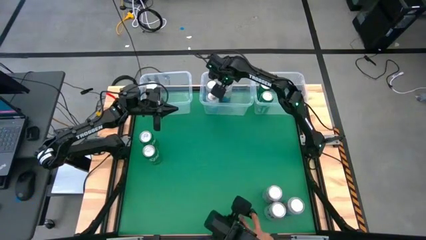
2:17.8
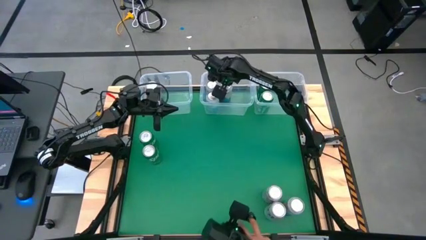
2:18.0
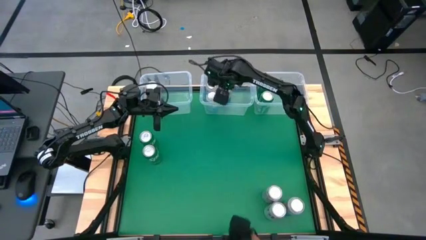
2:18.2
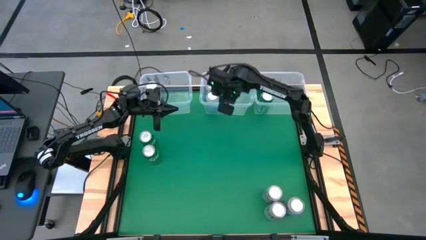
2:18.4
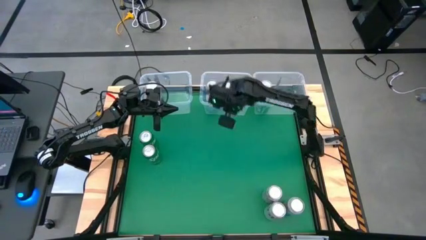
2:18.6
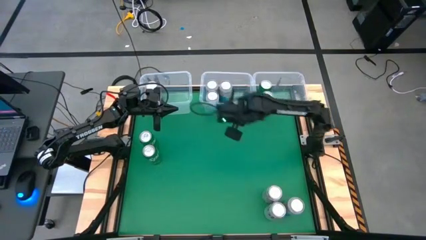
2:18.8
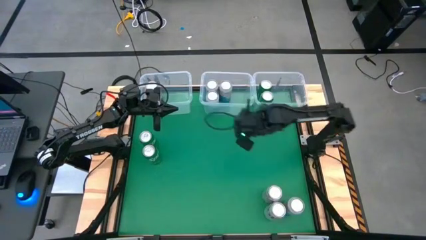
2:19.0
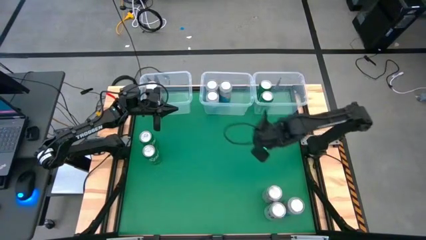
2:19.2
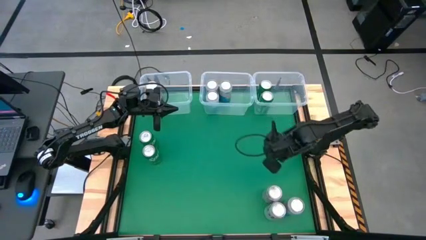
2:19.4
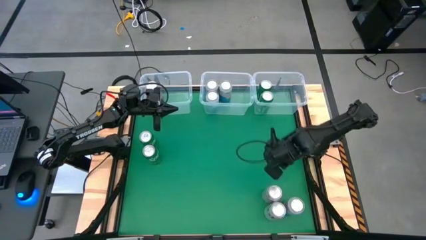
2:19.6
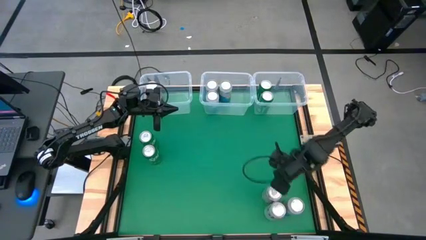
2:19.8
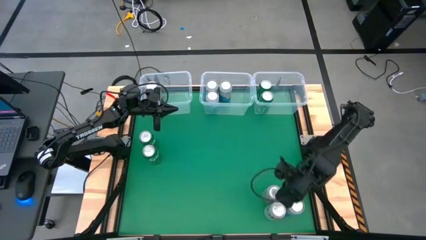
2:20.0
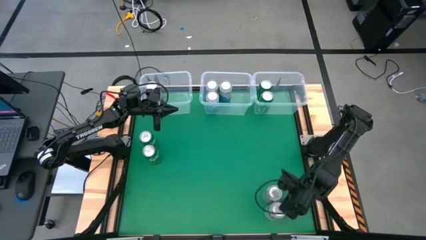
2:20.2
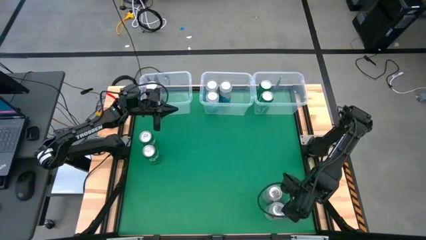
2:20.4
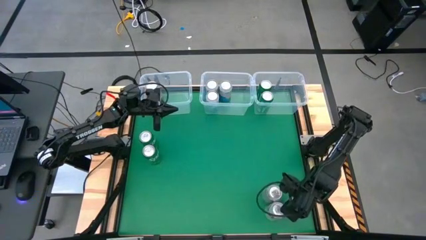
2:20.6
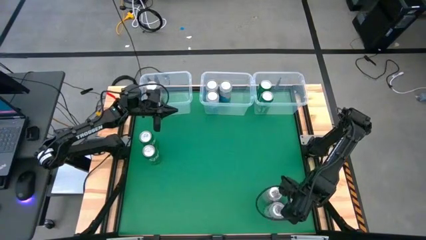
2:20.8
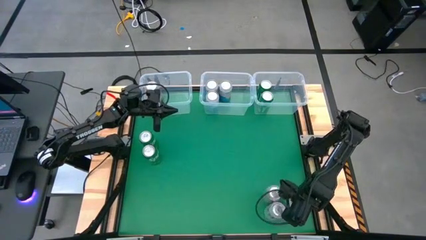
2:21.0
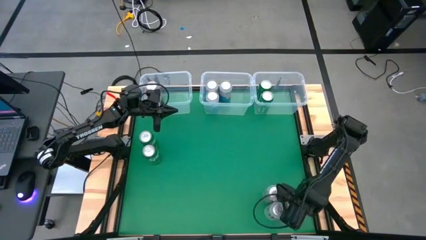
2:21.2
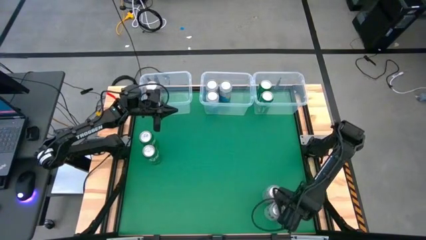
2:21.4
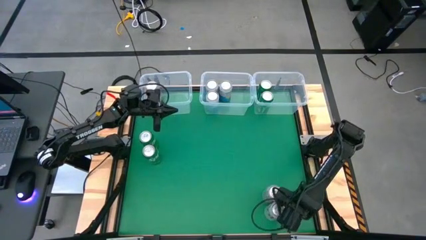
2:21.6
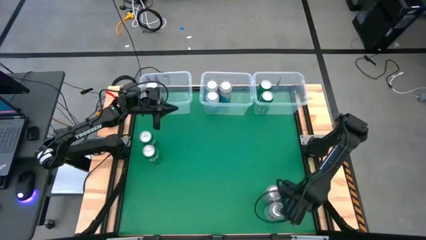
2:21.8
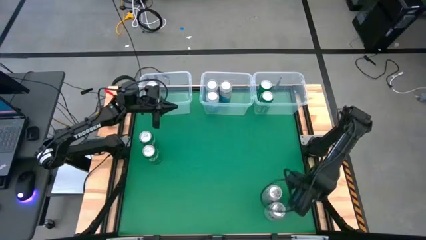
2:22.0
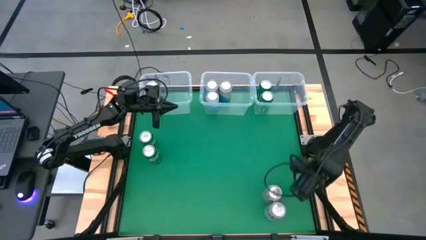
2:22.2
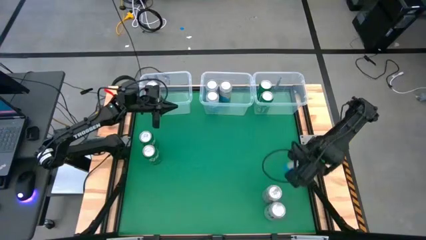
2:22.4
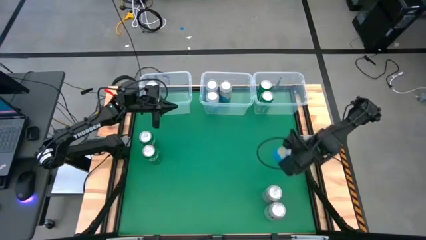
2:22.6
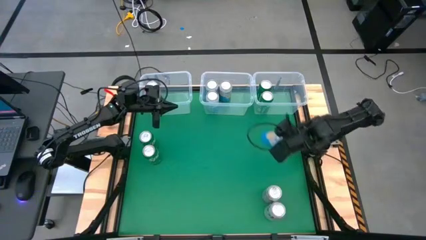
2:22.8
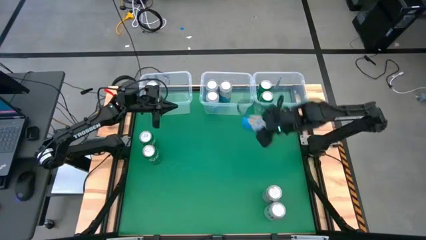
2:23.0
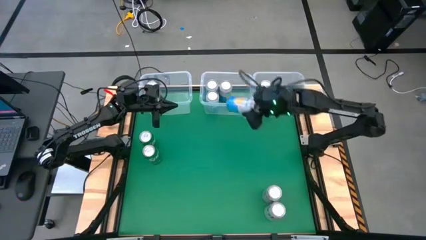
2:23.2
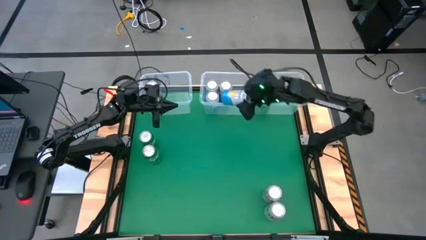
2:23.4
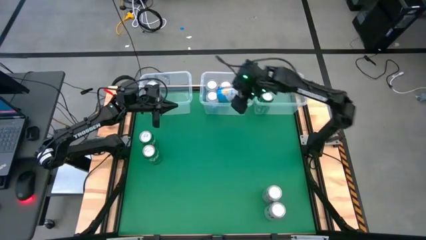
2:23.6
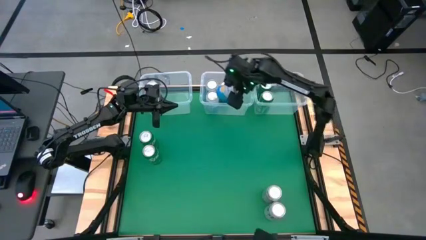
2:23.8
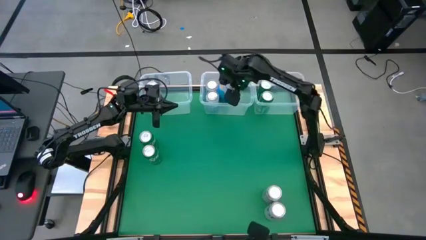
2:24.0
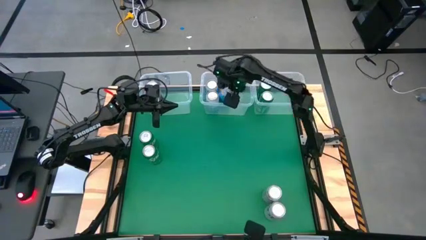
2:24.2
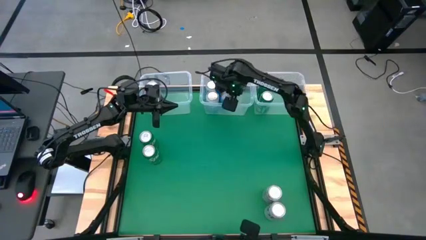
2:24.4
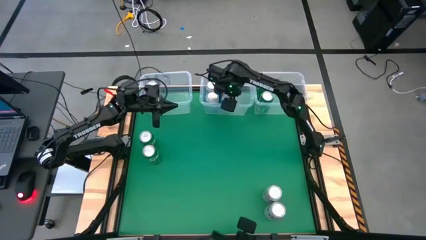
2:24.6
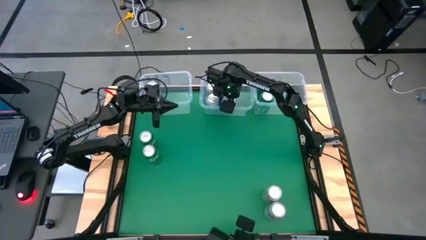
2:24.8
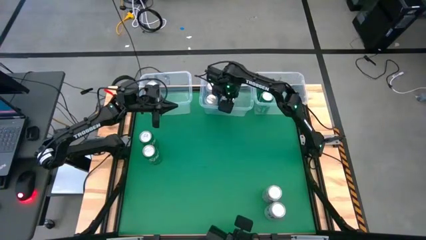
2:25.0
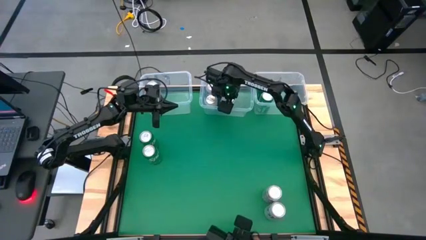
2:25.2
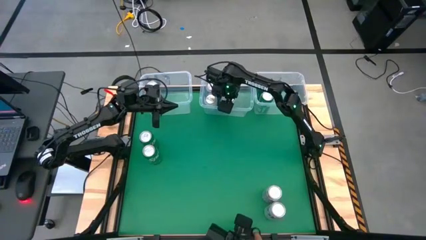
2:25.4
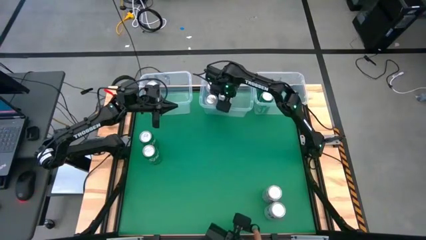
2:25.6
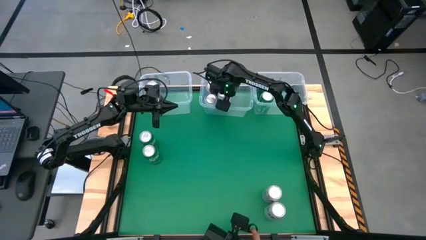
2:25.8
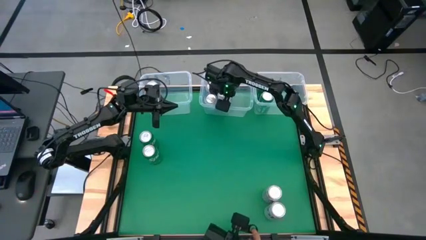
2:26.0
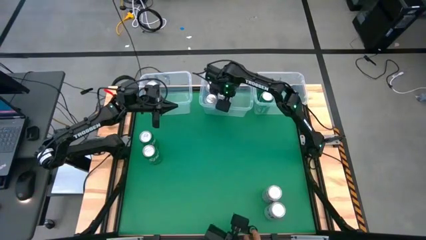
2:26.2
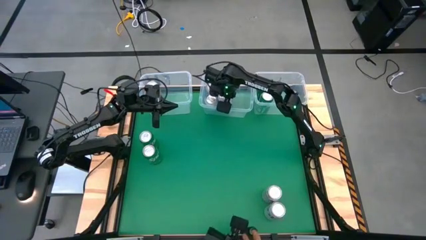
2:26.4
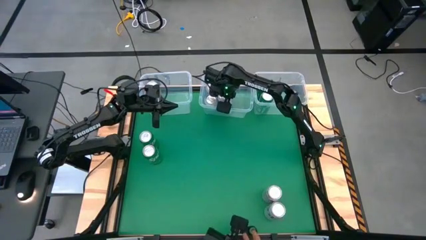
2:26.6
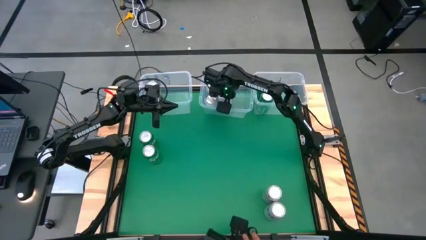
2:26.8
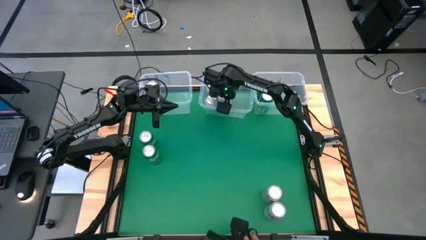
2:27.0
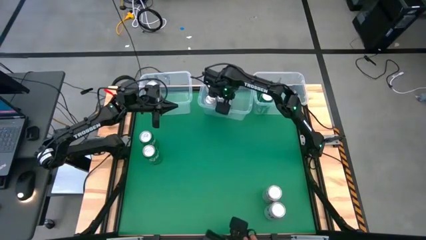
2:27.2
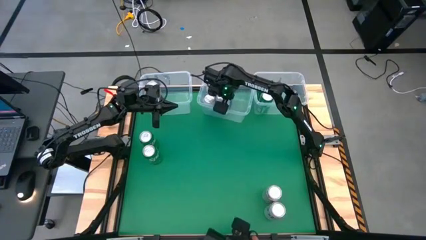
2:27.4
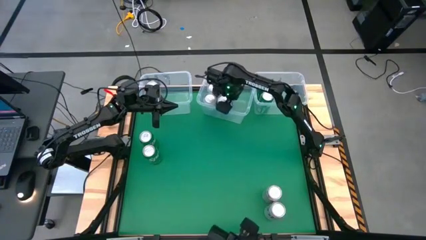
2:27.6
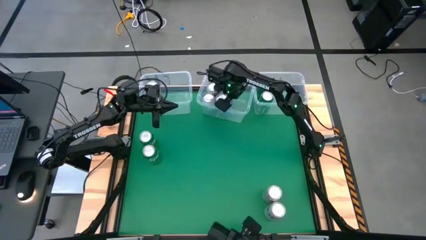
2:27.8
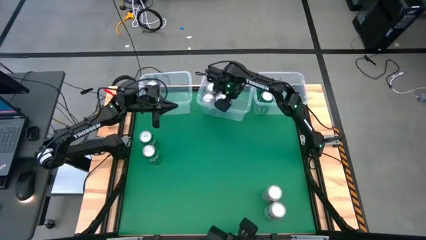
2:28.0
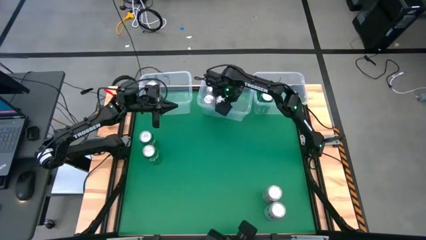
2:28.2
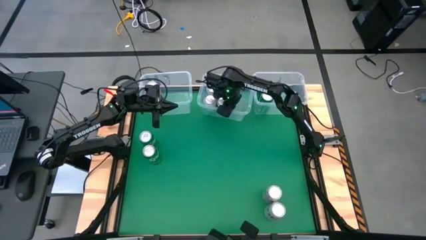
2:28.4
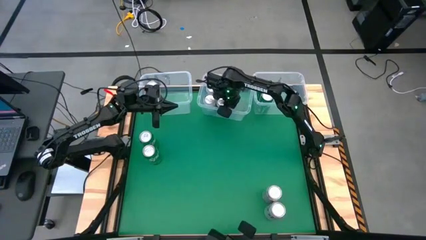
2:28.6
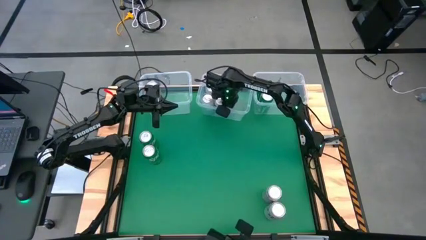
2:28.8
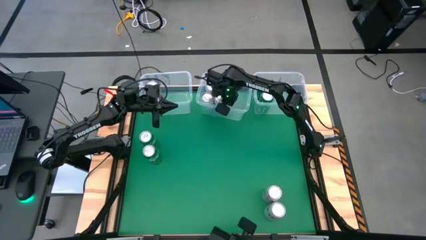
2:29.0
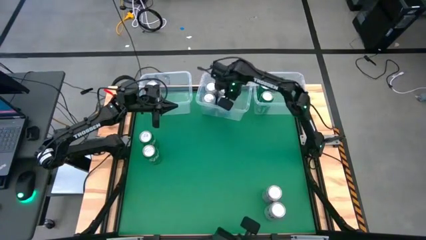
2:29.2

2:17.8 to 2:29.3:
Task: Sort soda cans
Put the blue white soda can into the middle transparent bin

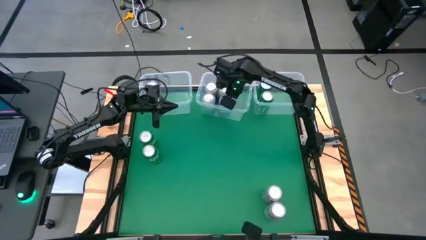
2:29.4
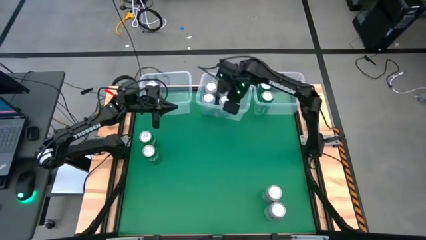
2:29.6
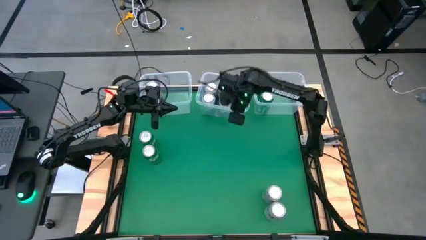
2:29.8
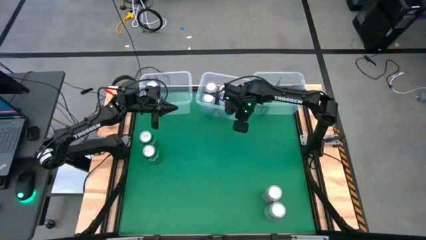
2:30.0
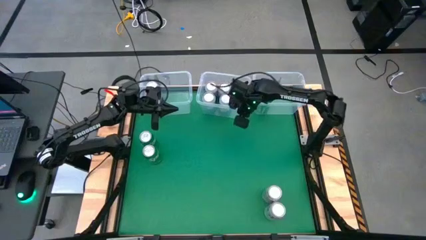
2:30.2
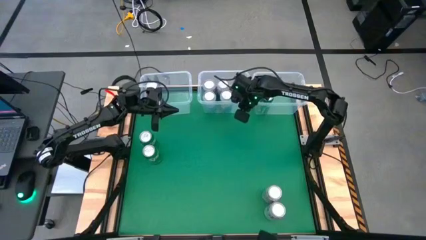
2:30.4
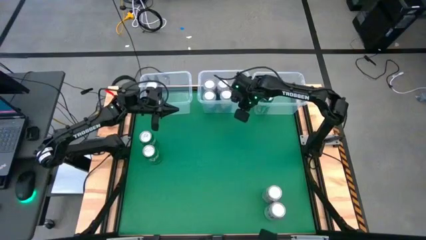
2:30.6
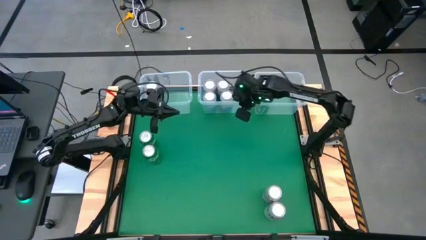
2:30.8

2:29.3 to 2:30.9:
Adjust the middle transparent bin

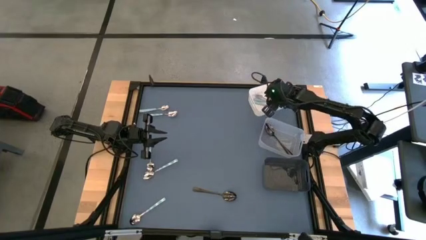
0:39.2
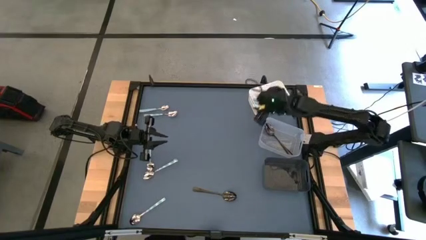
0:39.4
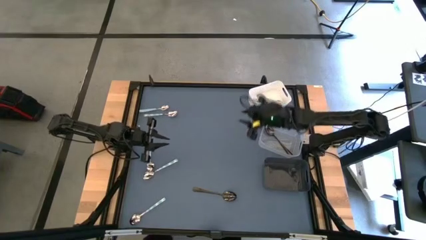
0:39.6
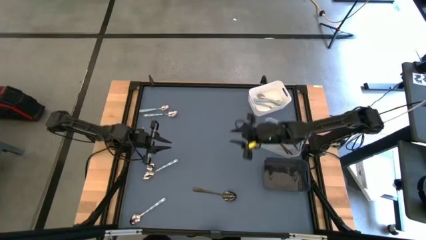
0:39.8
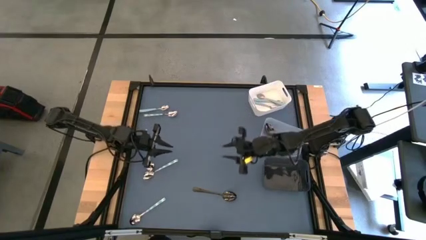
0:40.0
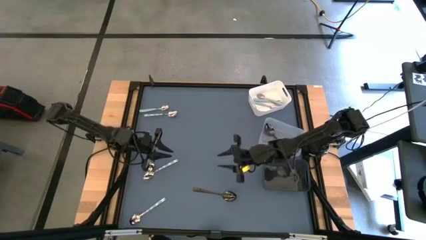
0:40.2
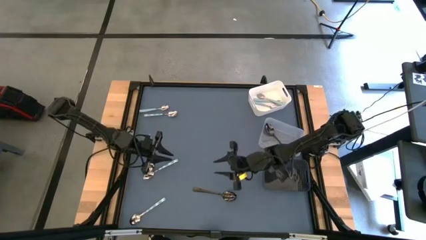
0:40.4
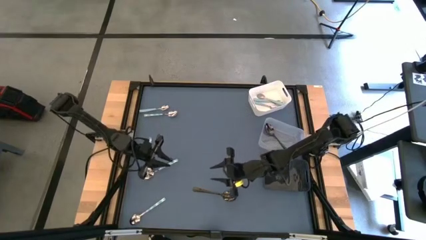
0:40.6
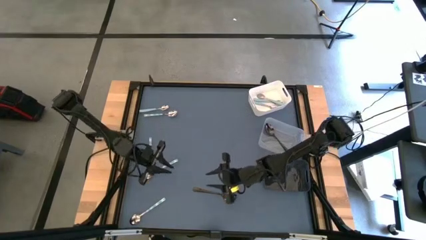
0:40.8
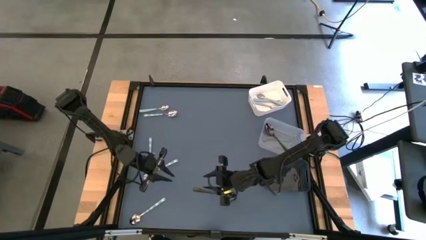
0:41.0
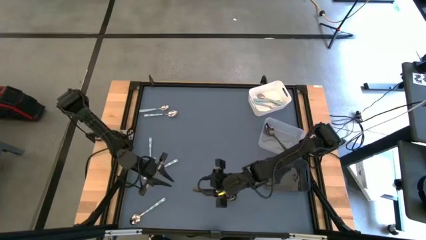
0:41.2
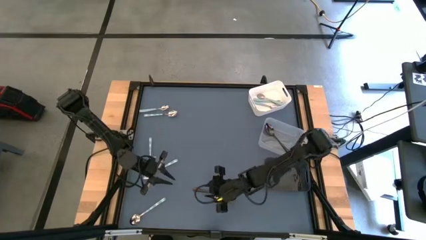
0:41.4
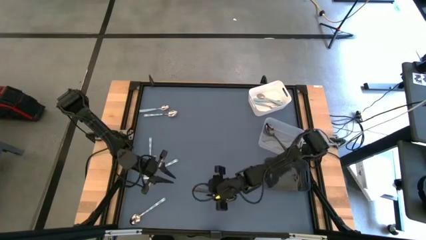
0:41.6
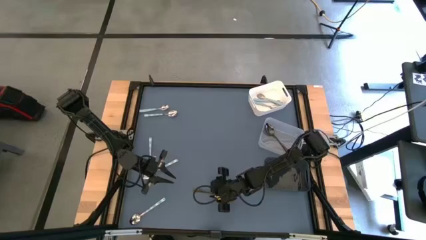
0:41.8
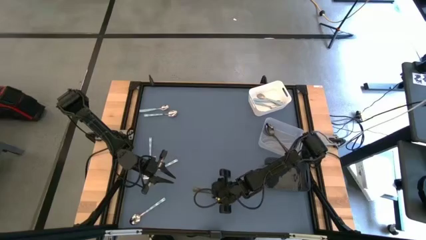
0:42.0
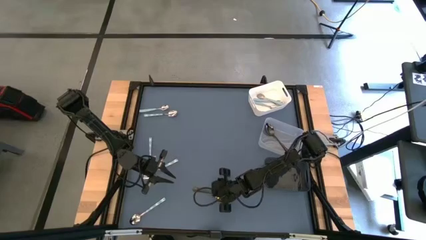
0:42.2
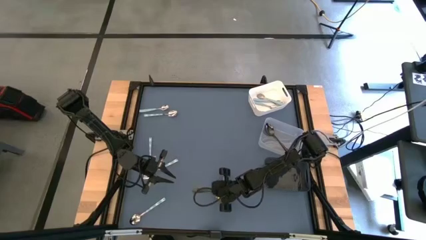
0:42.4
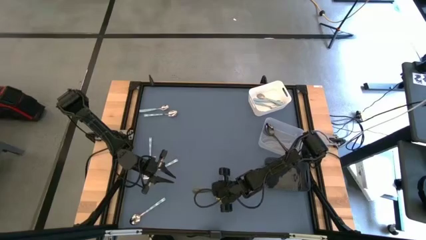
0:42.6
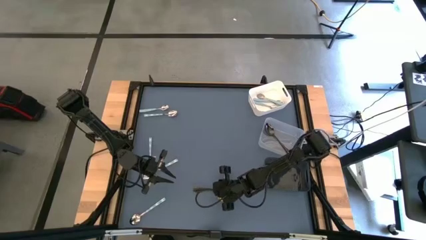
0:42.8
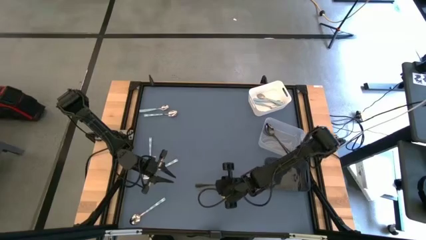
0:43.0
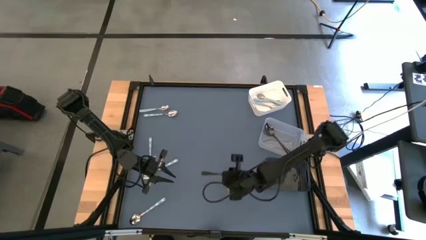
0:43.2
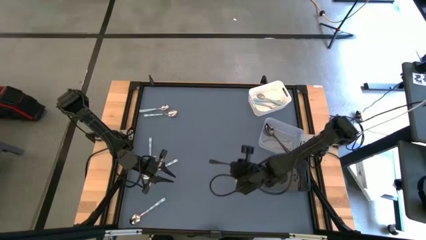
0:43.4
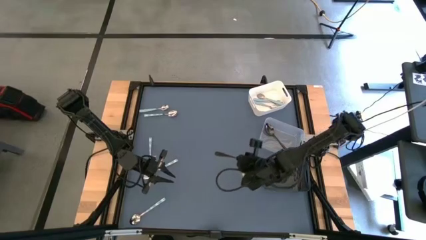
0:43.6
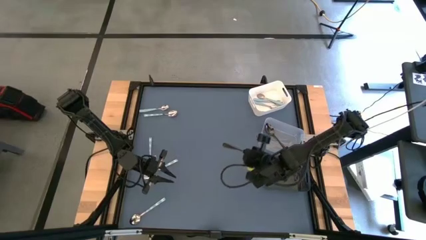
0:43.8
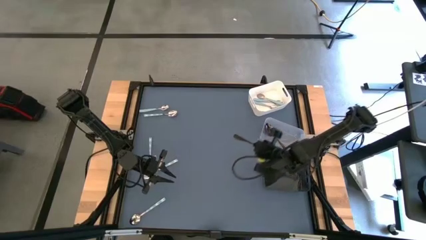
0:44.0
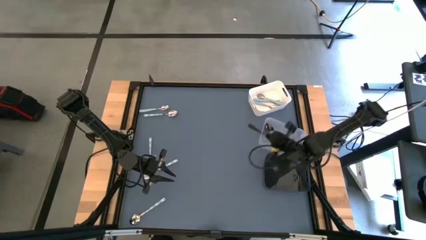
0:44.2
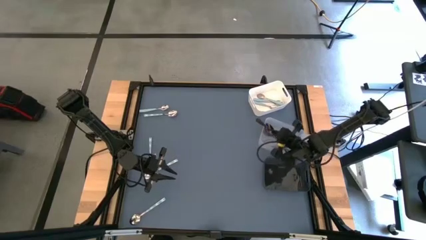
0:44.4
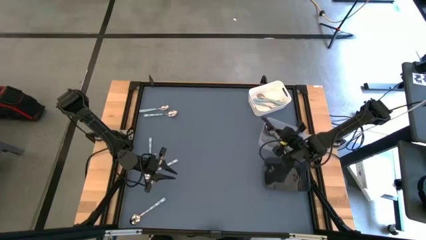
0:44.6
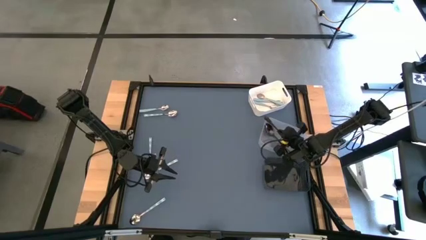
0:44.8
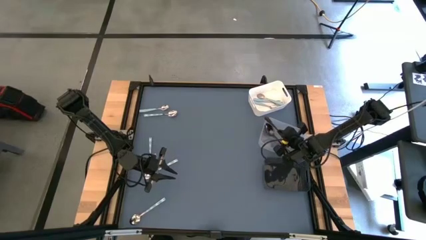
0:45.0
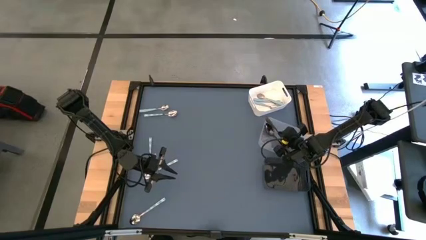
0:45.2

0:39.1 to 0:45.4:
Task: Sort silverware by color (type)
Put the black spoon into the transparent bin
